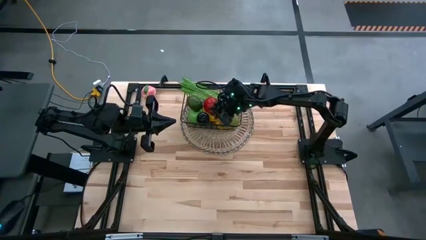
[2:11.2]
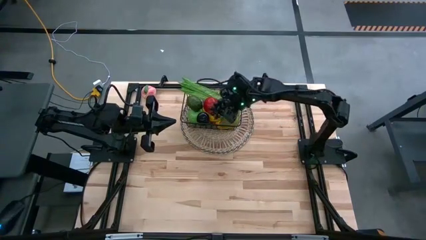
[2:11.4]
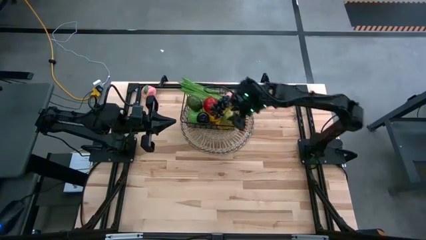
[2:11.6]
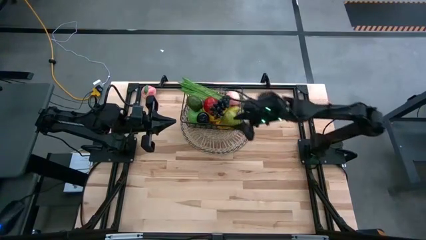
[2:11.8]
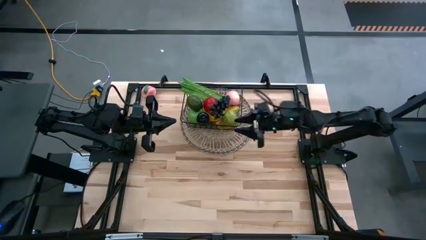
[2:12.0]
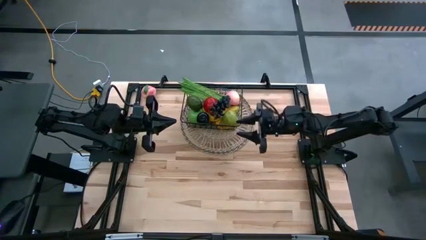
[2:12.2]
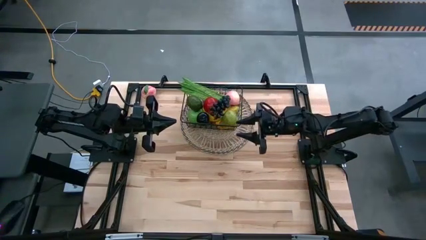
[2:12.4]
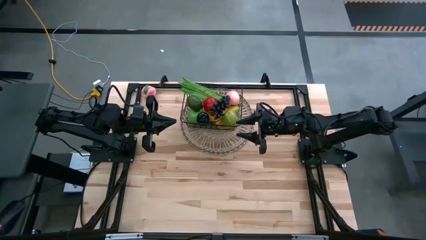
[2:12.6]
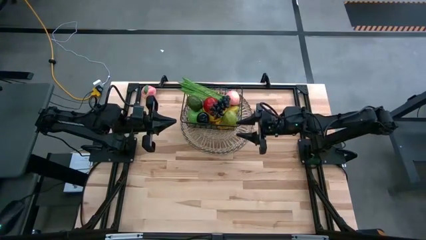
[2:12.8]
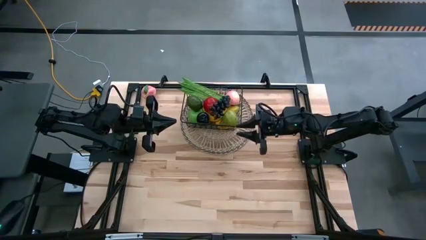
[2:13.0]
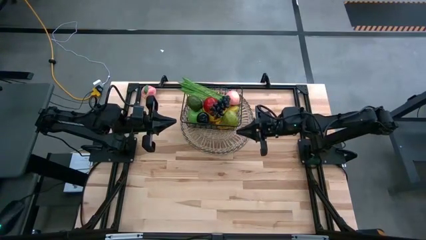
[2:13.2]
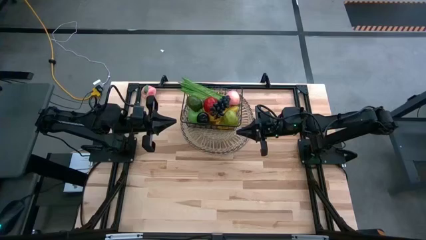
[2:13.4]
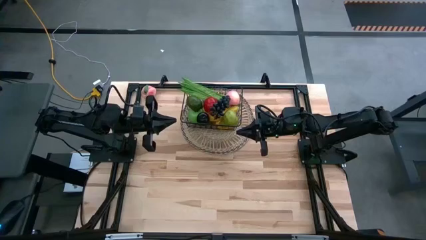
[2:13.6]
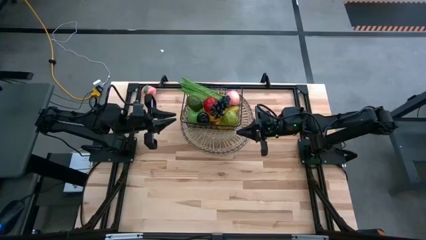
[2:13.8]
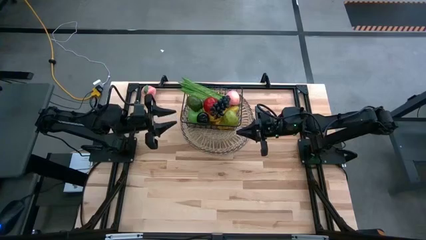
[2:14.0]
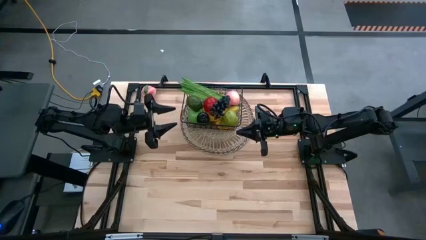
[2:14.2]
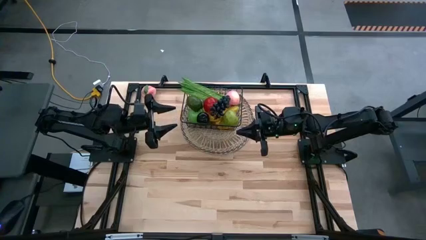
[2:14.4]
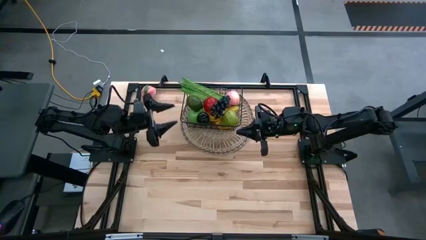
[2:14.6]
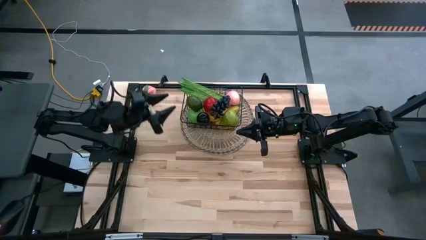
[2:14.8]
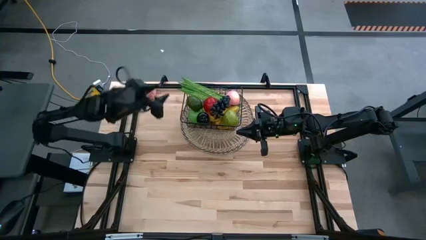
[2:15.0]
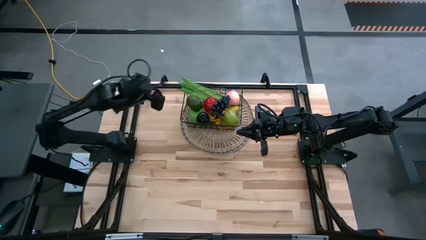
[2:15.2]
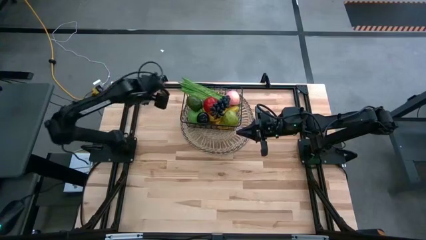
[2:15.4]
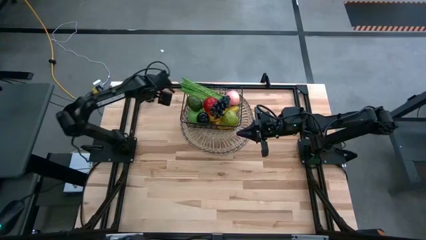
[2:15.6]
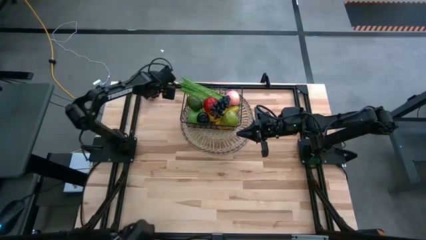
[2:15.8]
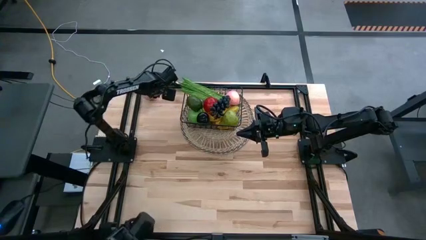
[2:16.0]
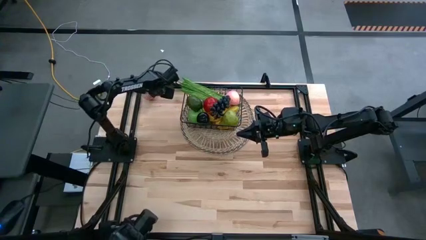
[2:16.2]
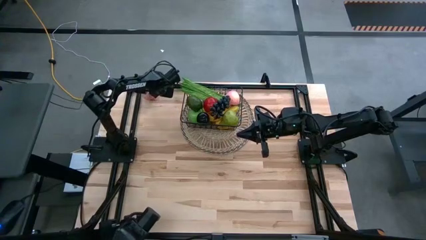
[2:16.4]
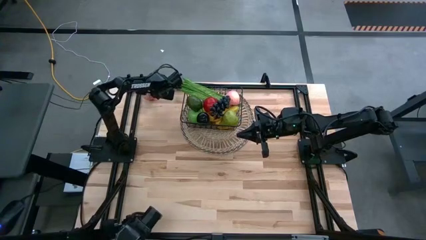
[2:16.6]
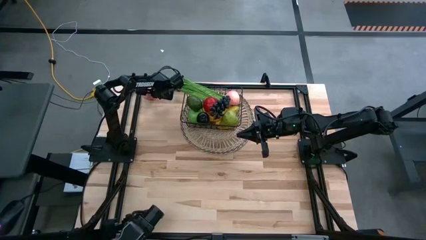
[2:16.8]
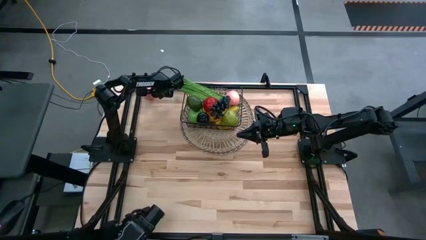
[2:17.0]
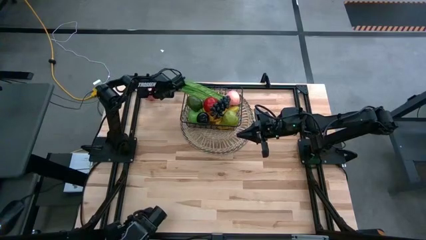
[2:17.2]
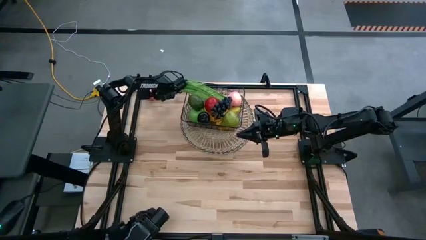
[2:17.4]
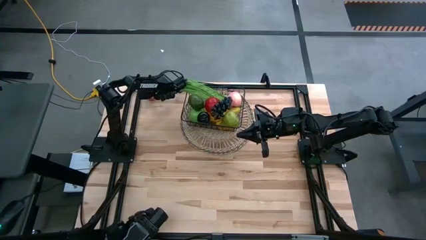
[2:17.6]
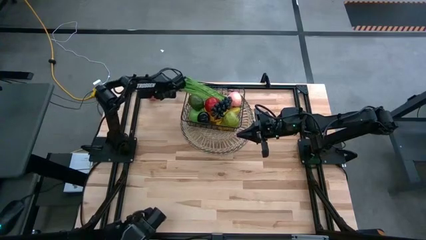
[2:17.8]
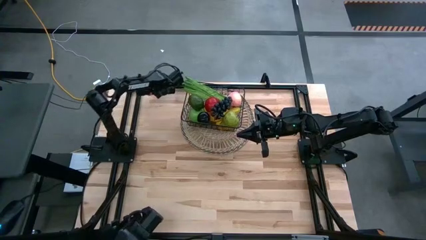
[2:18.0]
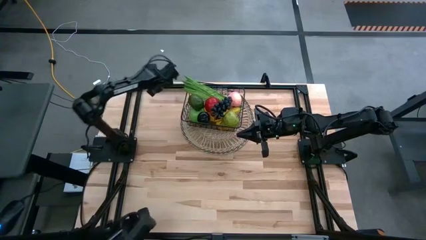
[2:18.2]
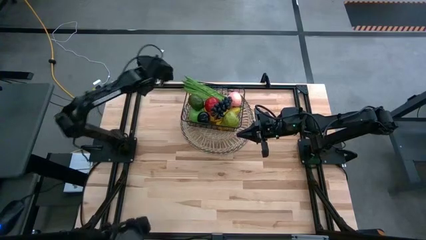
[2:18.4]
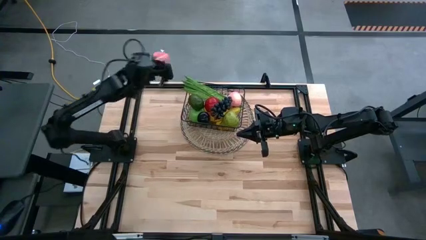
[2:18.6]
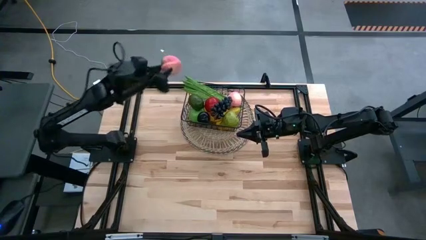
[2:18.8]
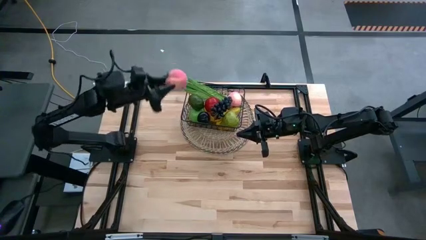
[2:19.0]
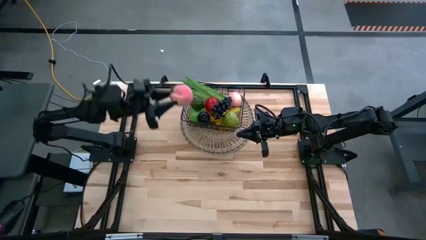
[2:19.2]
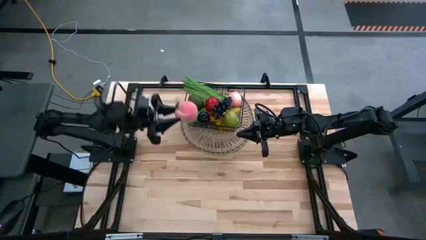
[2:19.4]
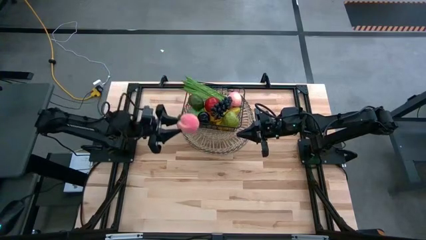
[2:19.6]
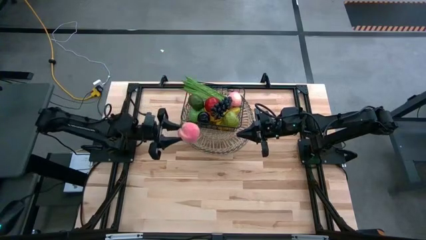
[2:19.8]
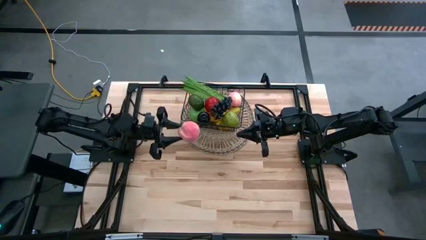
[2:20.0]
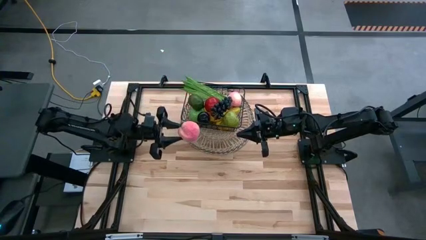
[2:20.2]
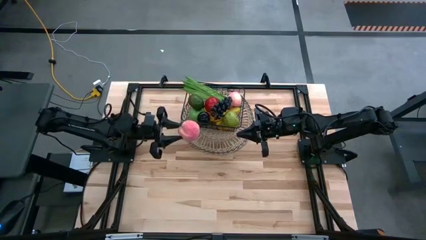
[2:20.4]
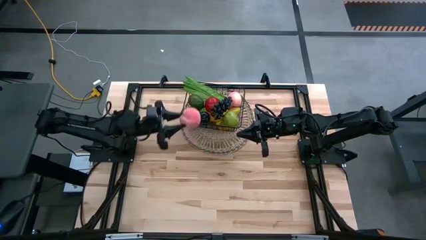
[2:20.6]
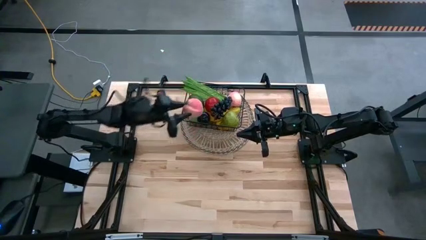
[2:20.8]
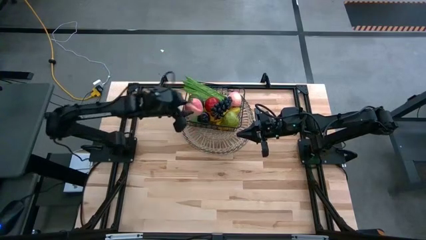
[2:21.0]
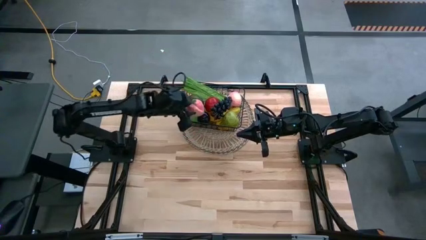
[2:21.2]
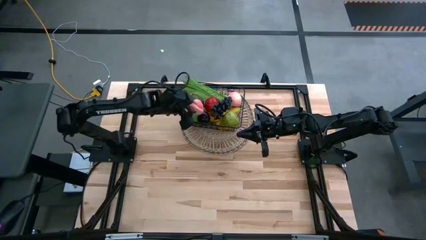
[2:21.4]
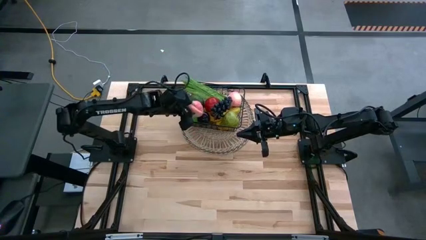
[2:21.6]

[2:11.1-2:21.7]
Task: Build produce basket
Put the peach into the black wire basket

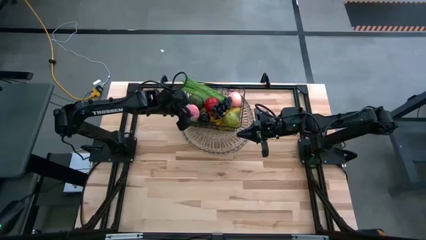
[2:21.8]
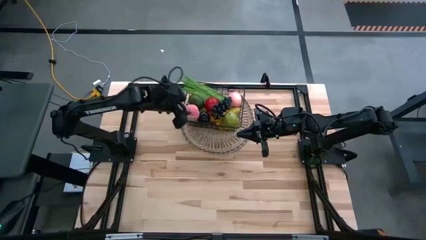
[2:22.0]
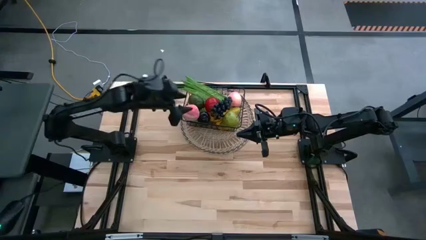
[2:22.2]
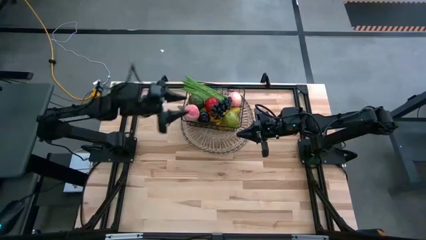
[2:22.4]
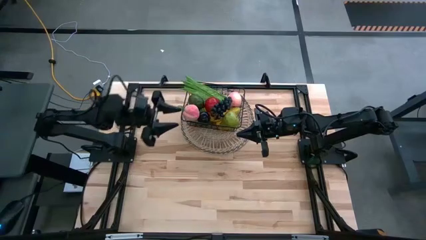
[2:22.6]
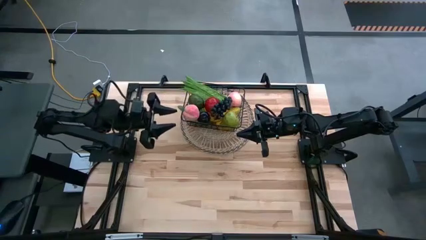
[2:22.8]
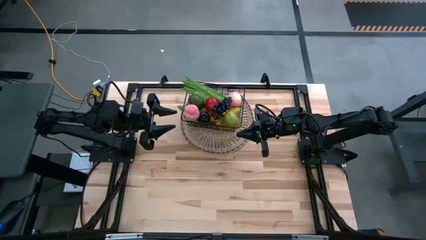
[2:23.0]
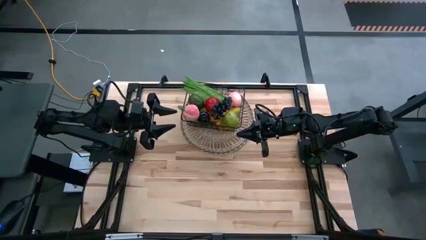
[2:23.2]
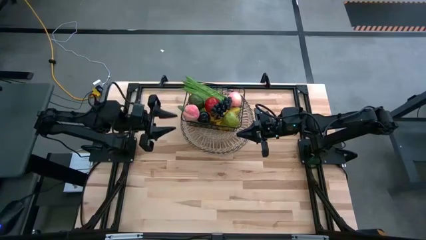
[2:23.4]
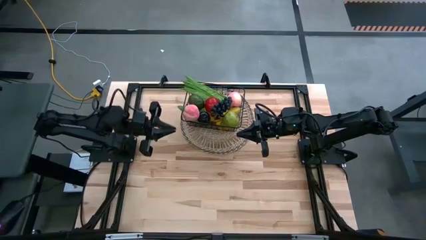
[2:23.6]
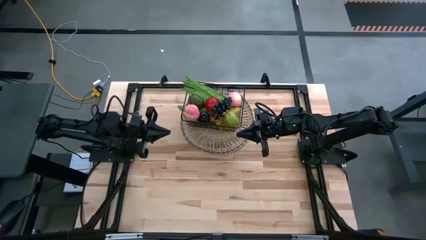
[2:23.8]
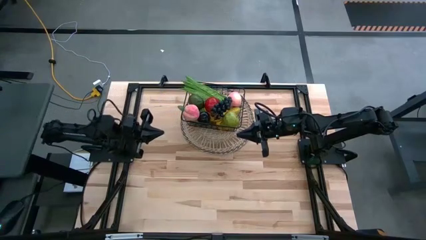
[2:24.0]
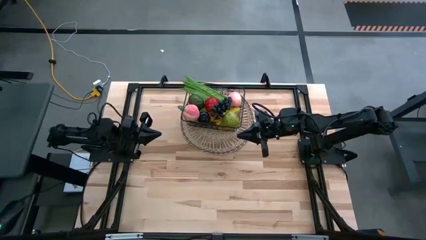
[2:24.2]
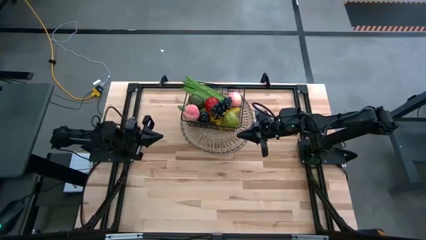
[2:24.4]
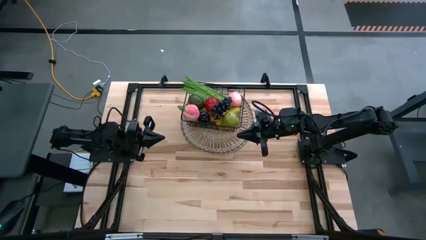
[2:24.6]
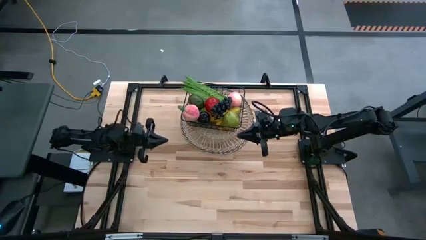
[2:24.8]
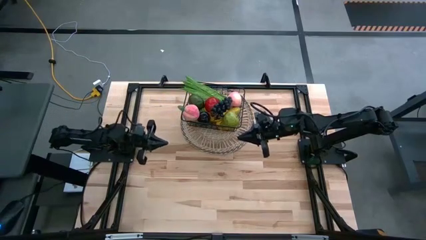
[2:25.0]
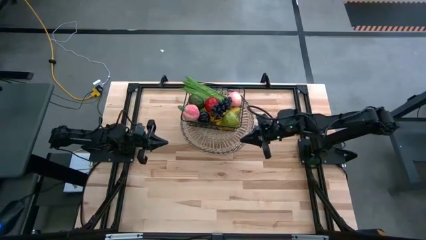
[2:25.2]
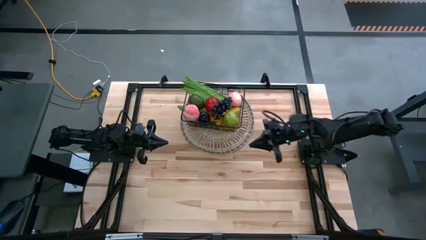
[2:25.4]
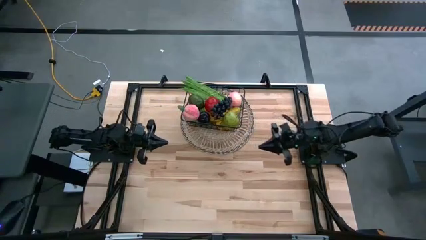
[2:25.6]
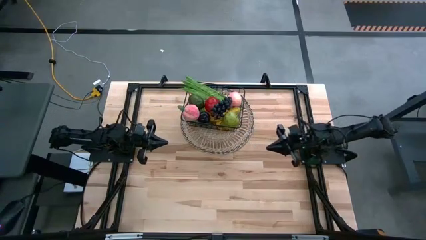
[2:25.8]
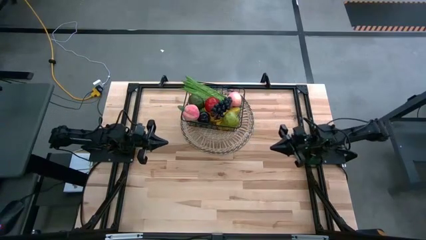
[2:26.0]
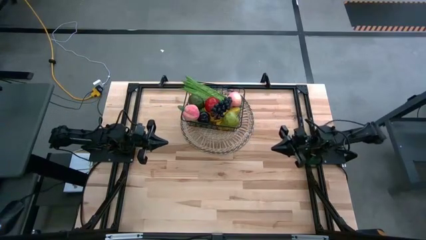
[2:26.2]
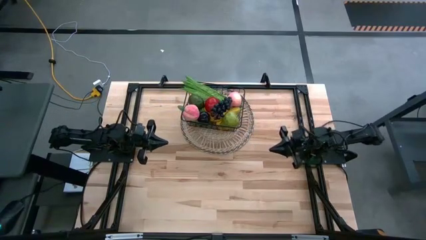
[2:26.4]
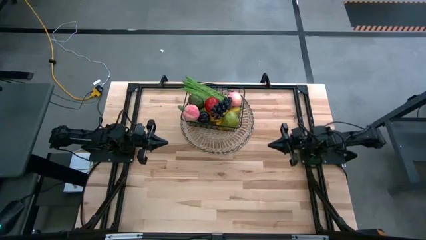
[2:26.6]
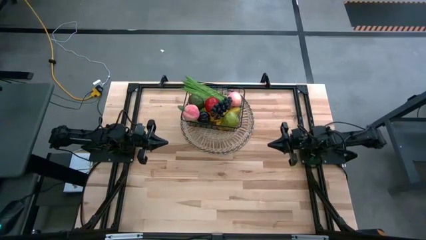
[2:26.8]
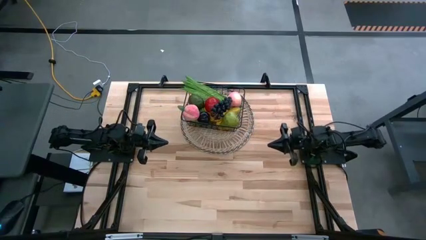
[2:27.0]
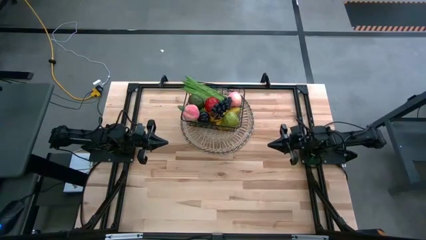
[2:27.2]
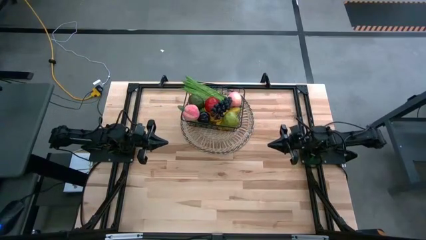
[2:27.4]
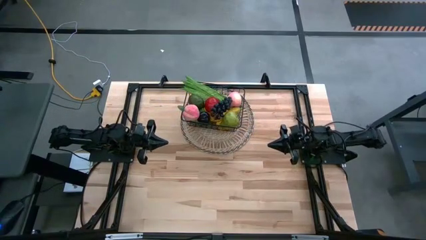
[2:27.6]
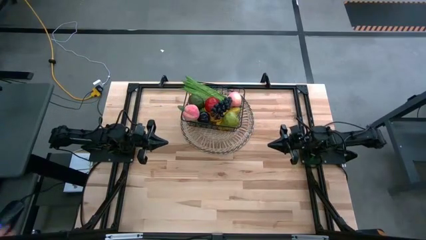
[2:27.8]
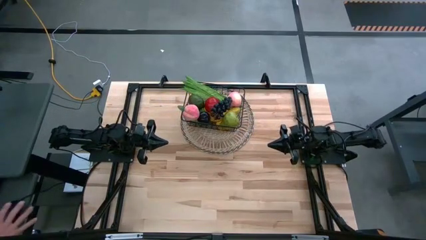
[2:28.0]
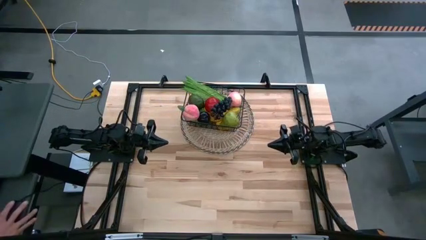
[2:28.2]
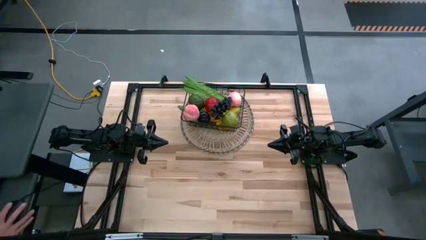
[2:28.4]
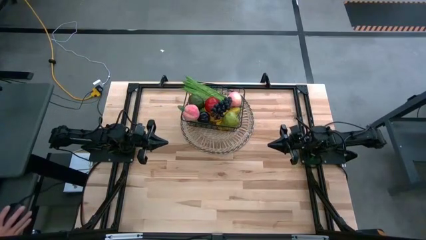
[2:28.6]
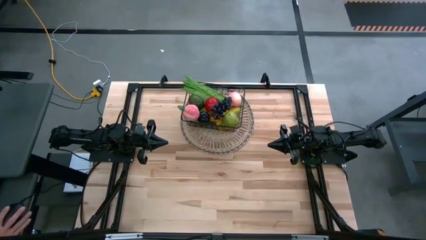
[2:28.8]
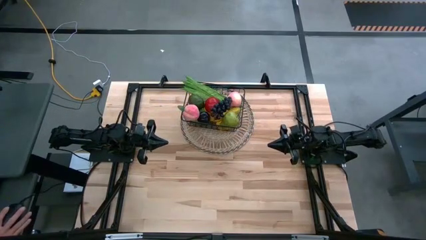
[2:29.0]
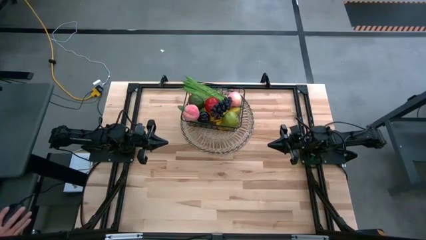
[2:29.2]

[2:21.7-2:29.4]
Return to Home Position
